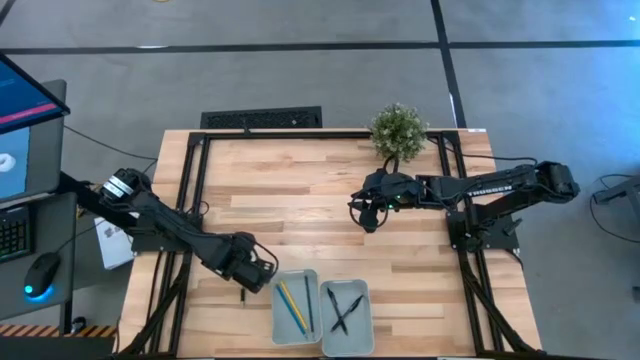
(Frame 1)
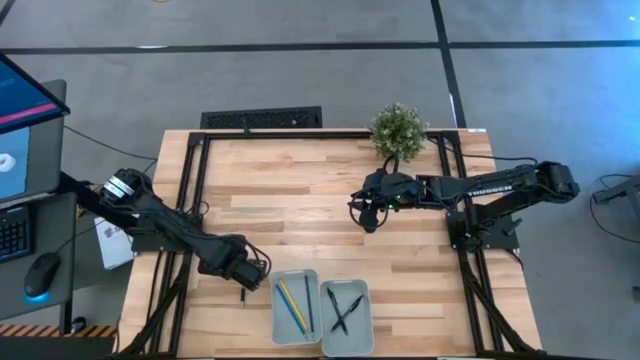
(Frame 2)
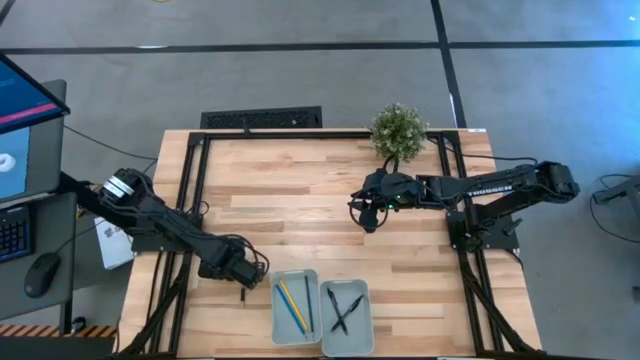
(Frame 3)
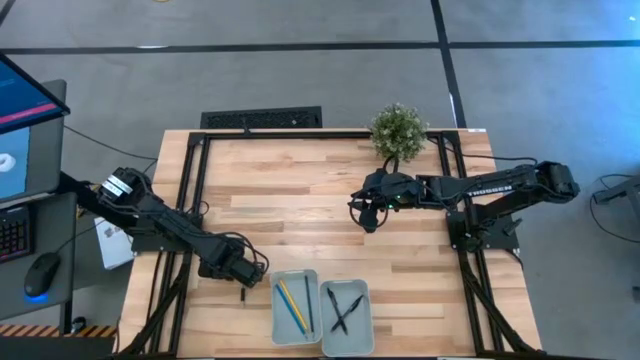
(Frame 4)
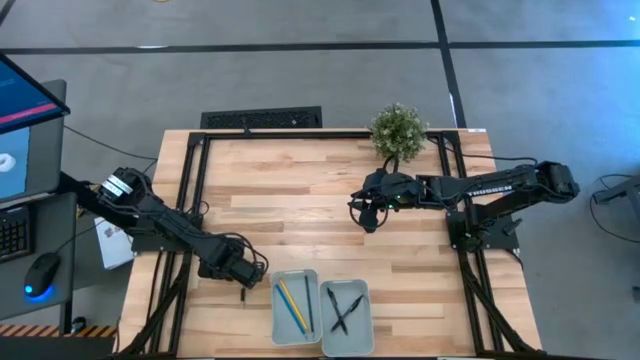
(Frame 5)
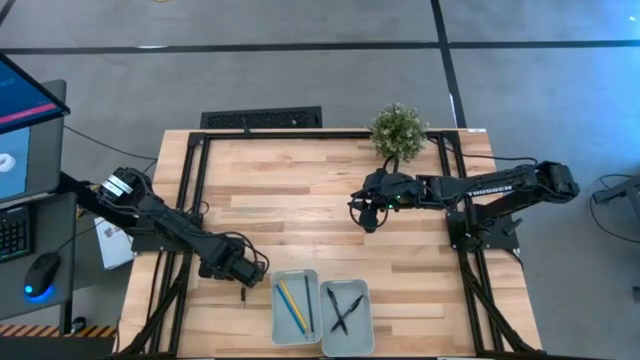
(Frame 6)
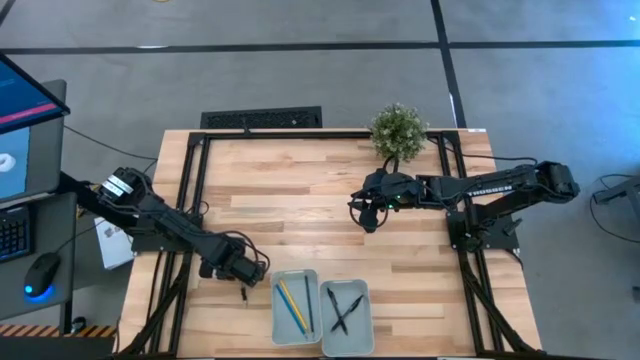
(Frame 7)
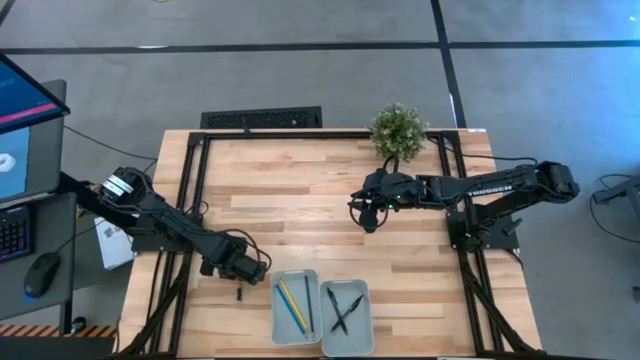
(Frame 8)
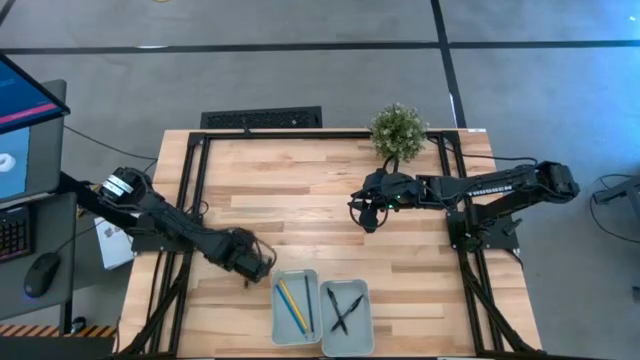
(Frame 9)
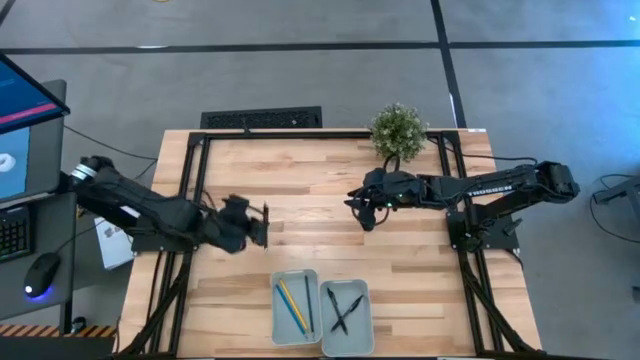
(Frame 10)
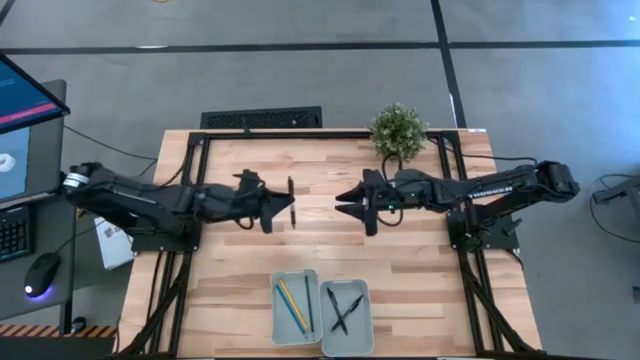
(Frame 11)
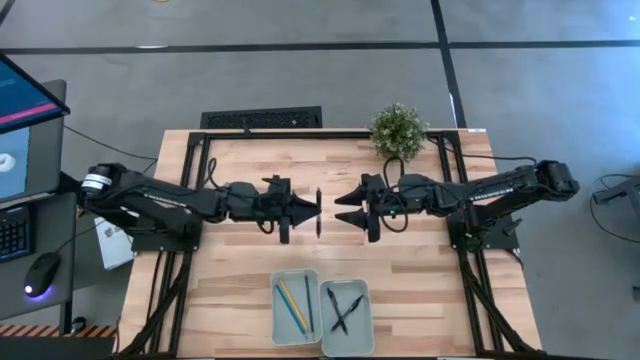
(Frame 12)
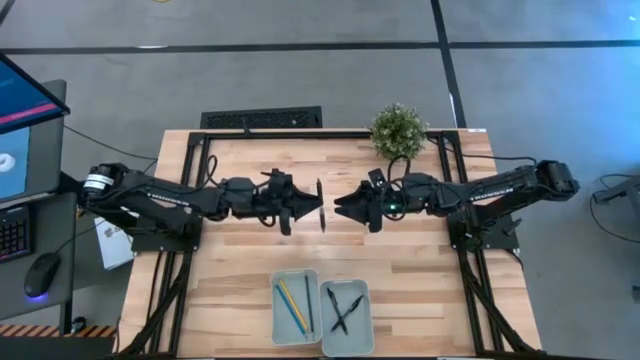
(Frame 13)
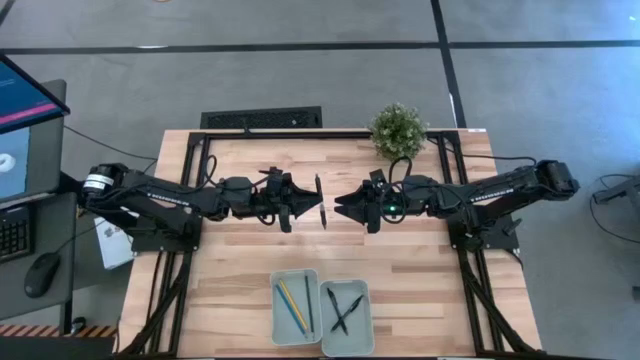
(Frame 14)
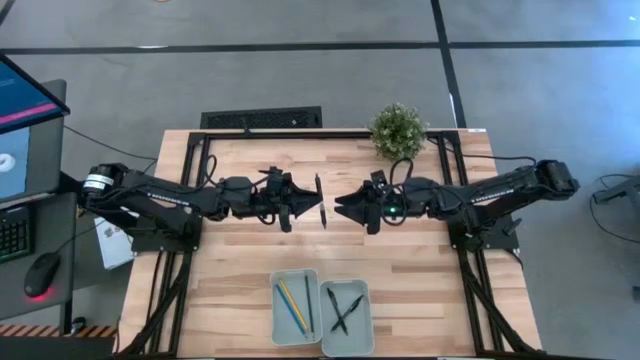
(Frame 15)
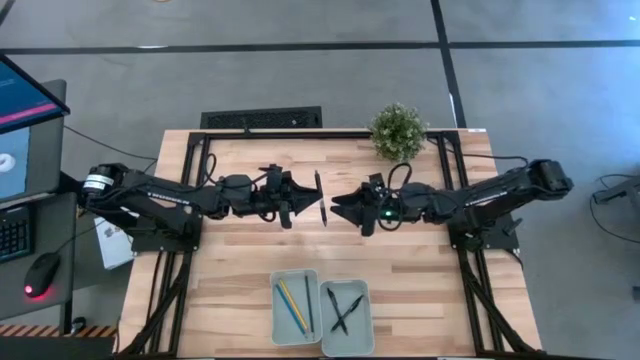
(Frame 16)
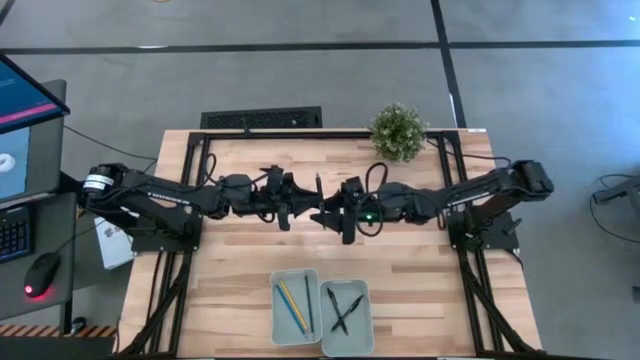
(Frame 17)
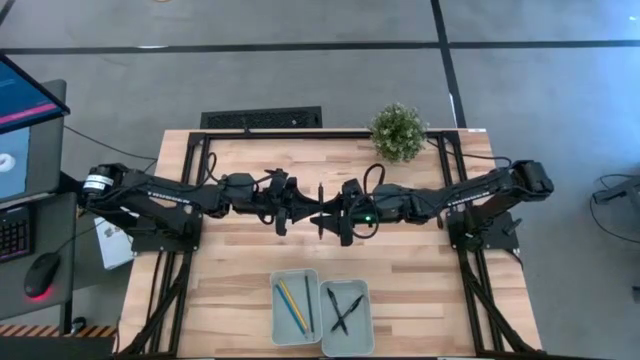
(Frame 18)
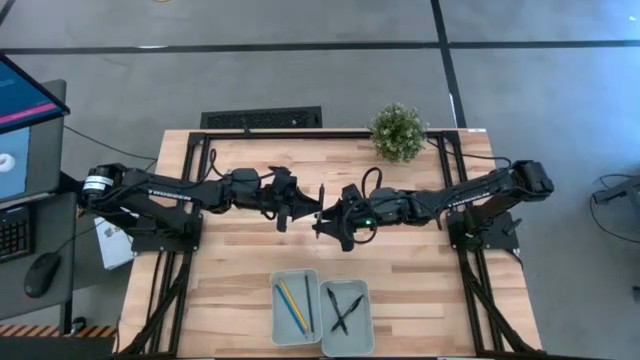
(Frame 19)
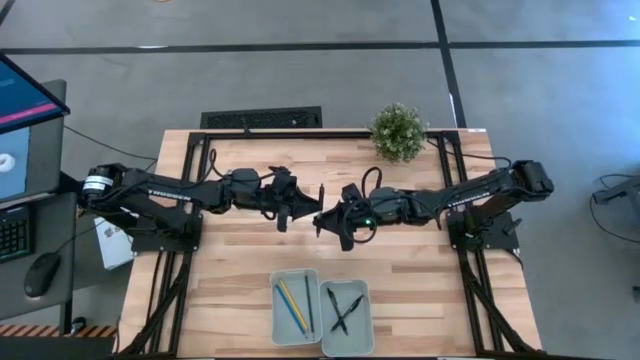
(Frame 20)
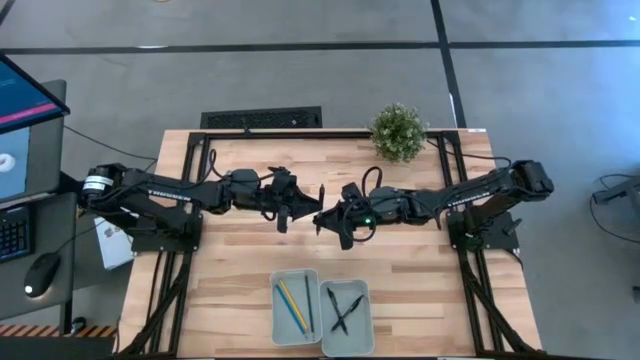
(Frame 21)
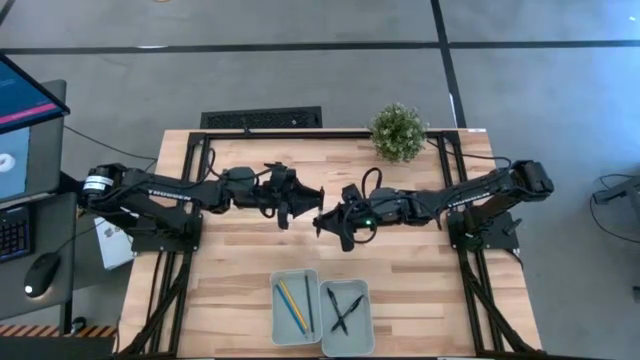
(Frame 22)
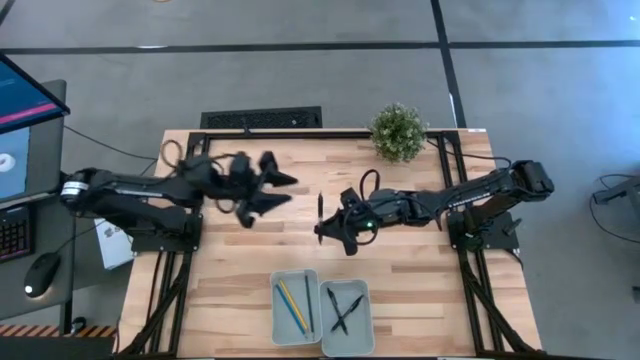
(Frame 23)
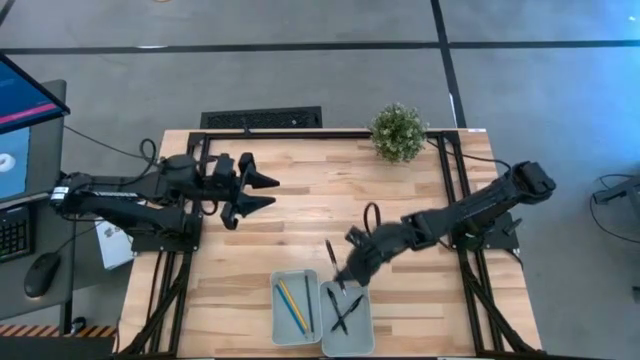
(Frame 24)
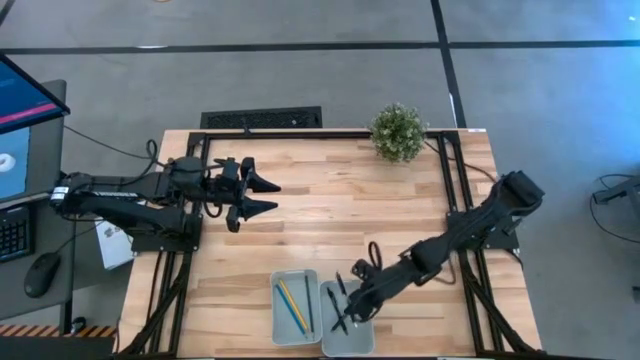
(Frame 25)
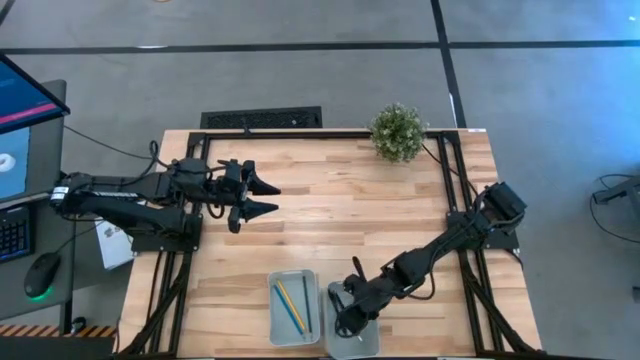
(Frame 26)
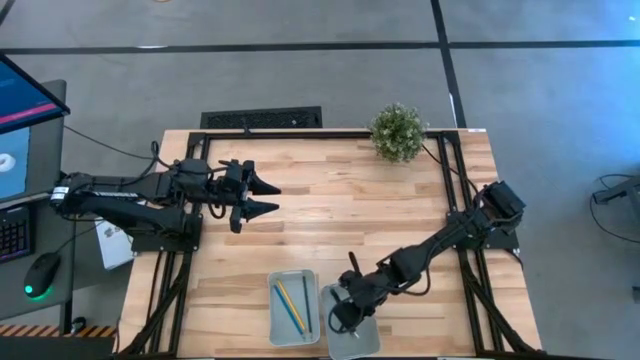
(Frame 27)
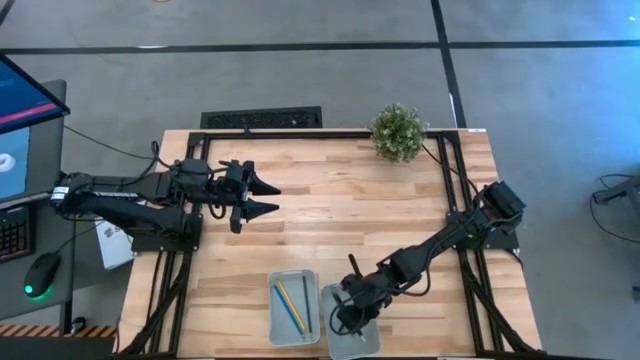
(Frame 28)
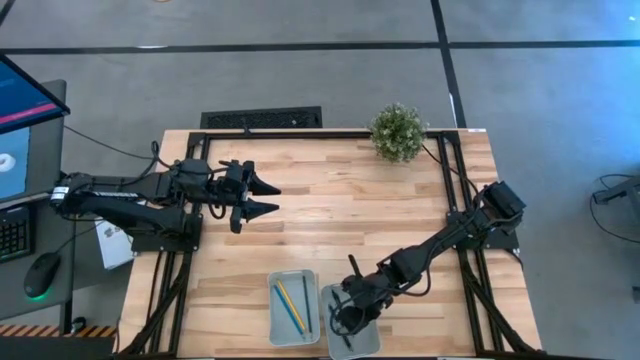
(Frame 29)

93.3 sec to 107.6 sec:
Task: Sort pens & pencils
Put the black pen into the right gray bin

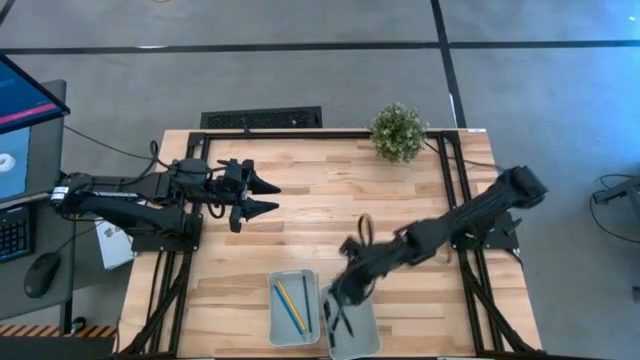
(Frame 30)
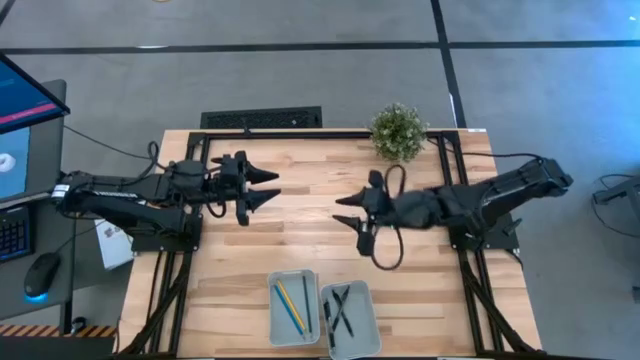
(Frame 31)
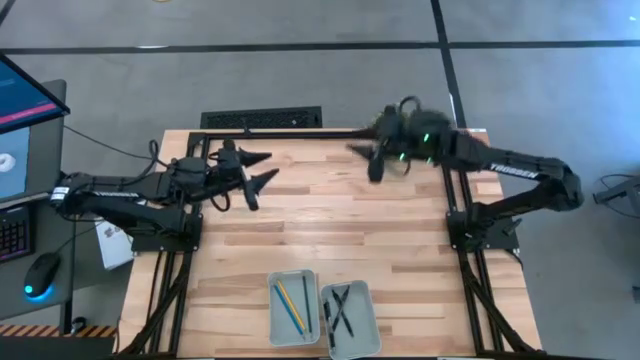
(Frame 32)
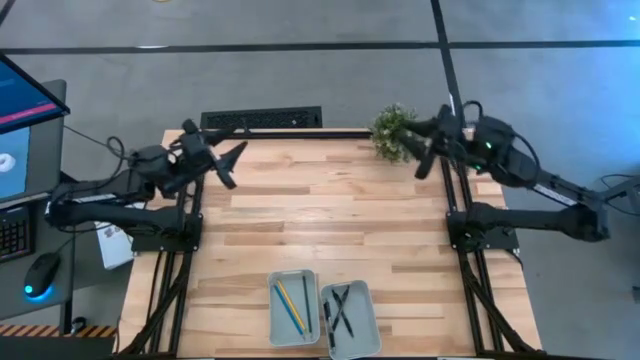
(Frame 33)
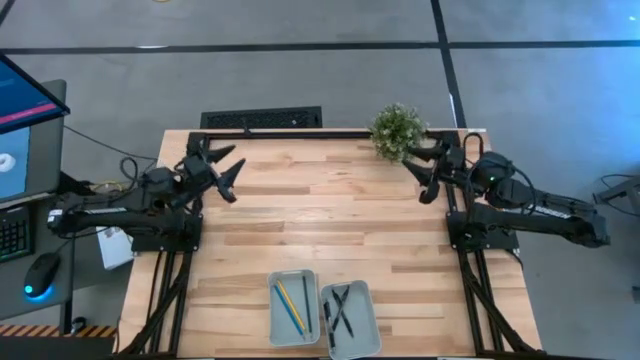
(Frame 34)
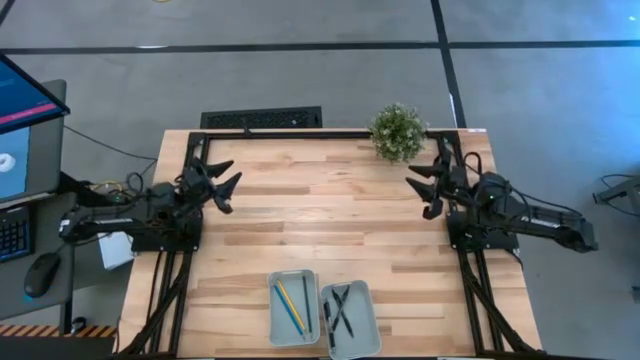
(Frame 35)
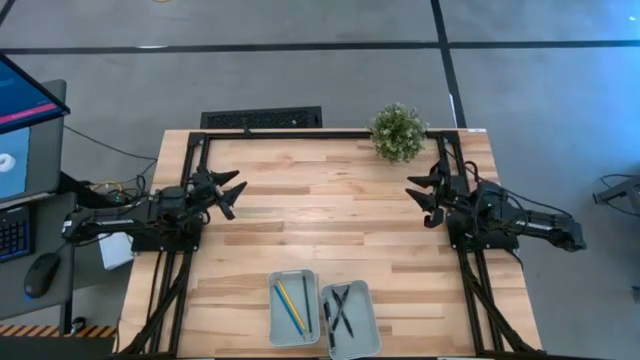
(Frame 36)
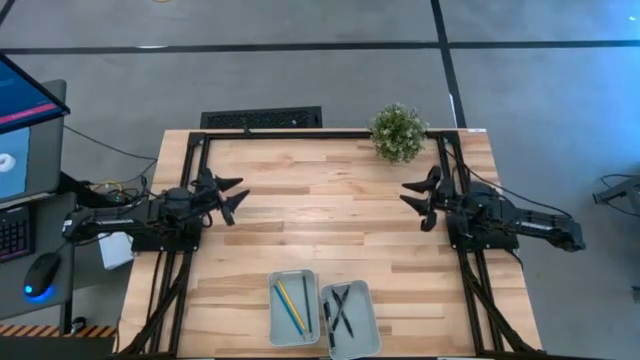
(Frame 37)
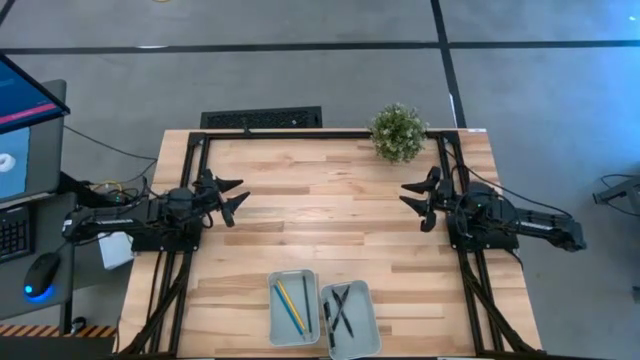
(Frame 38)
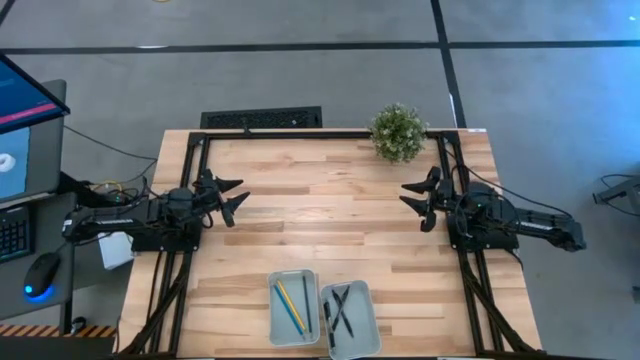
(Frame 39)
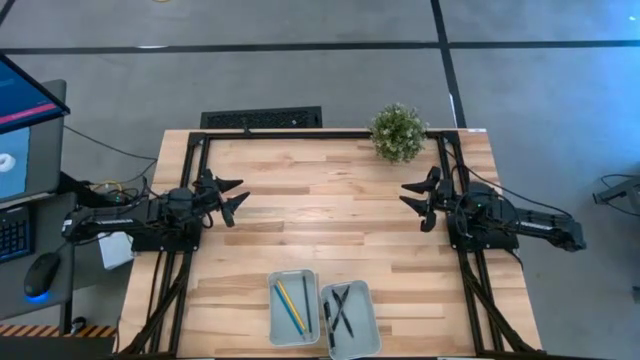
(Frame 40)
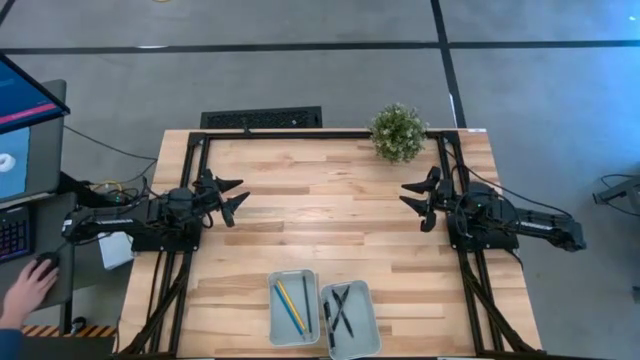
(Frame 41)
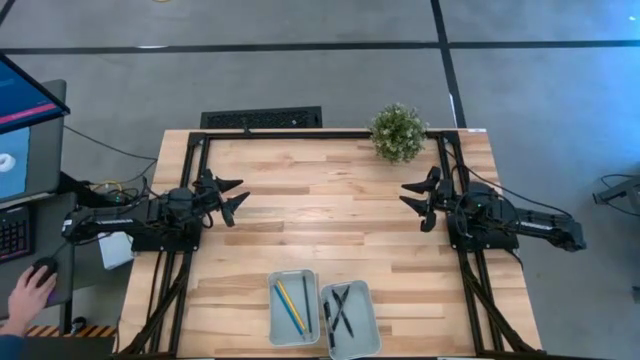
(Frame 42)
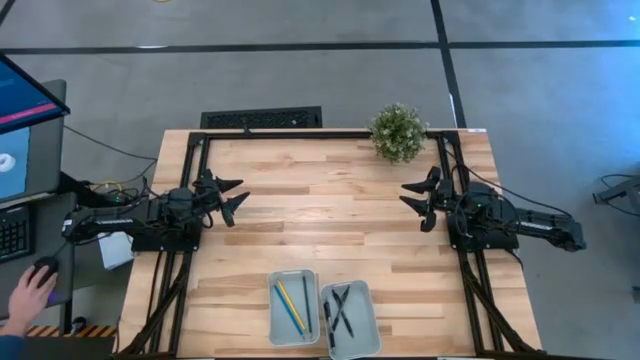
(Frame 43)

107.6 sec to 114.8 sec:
Return to Home Position
